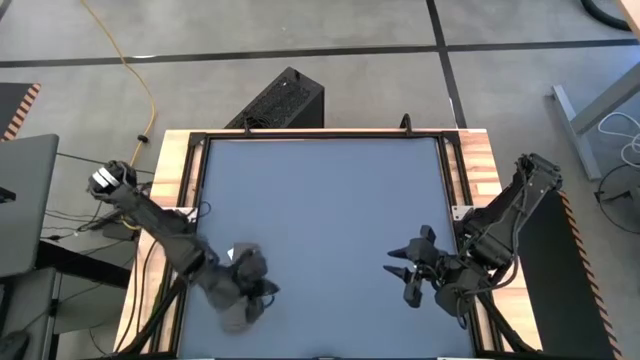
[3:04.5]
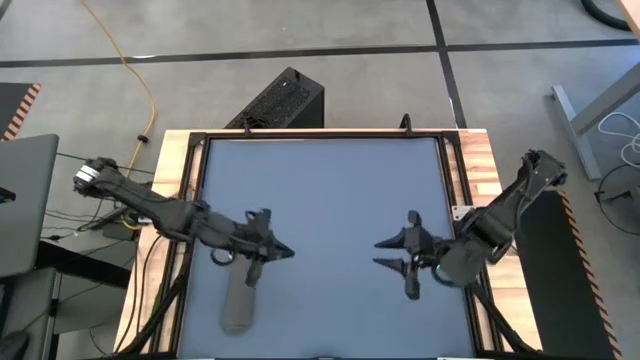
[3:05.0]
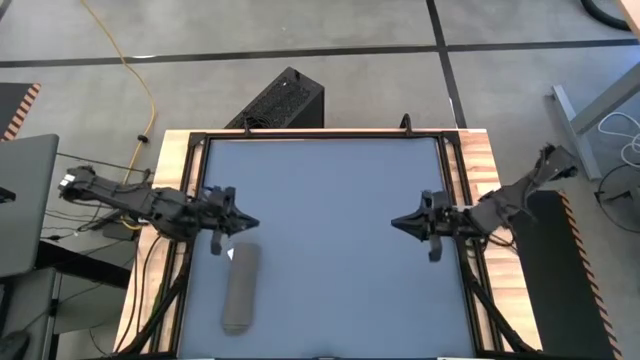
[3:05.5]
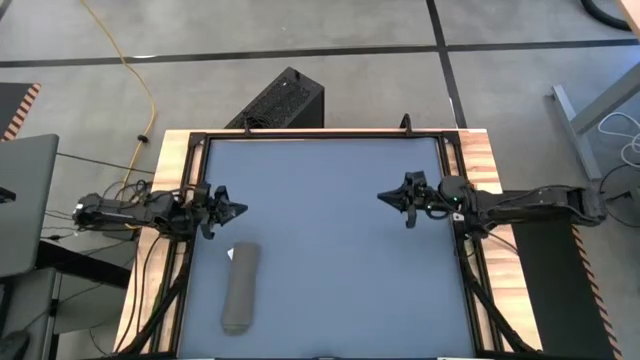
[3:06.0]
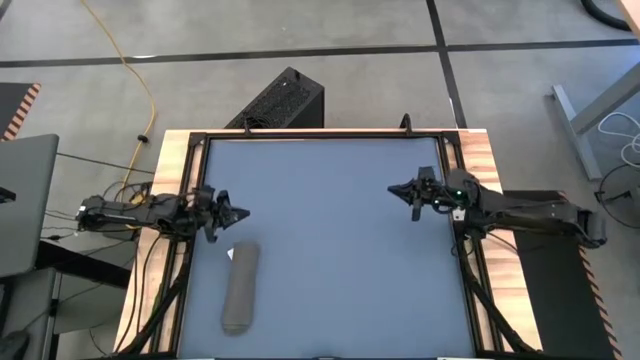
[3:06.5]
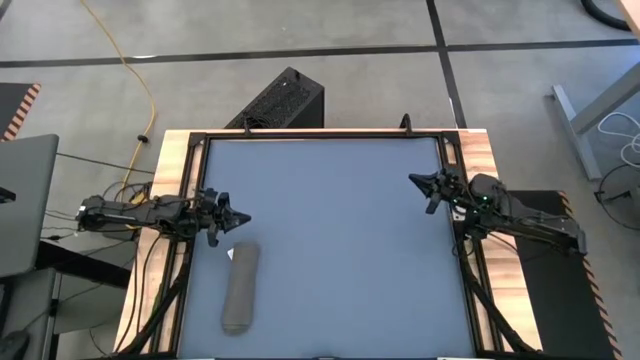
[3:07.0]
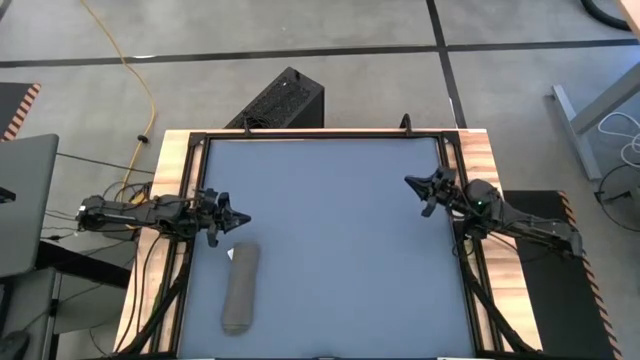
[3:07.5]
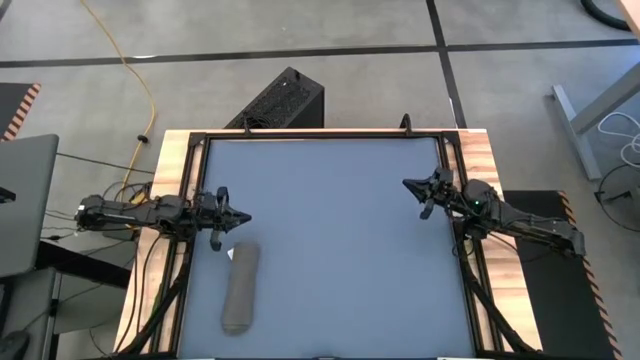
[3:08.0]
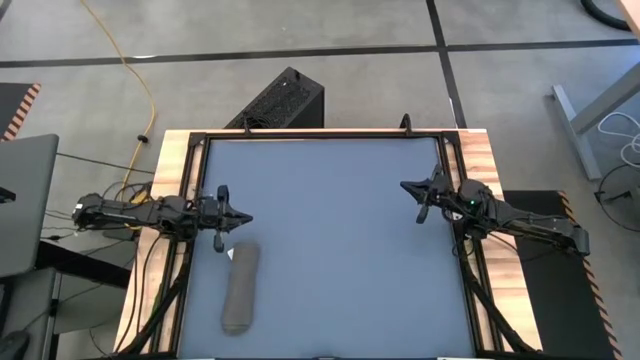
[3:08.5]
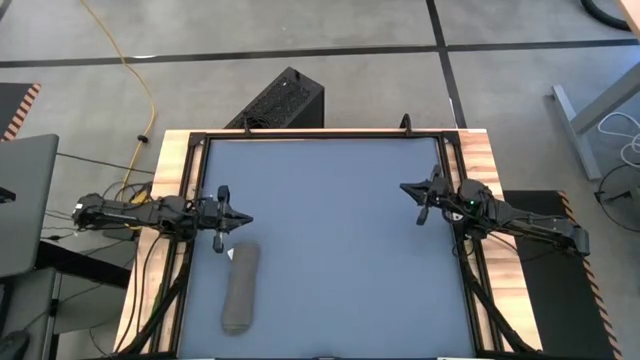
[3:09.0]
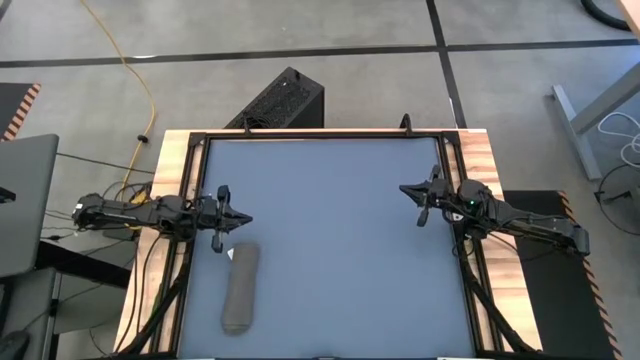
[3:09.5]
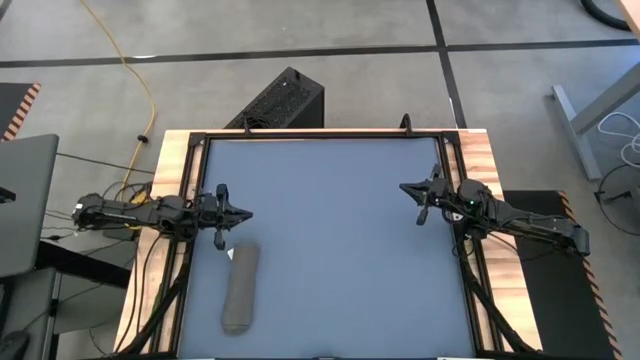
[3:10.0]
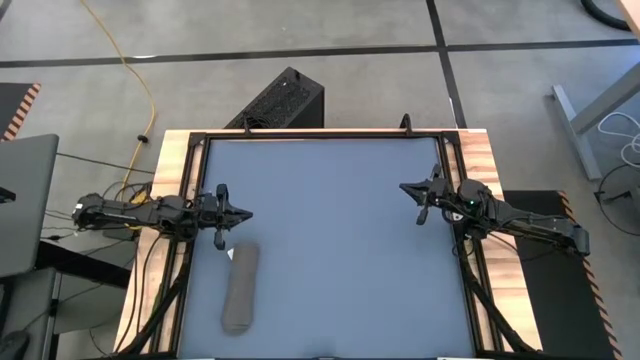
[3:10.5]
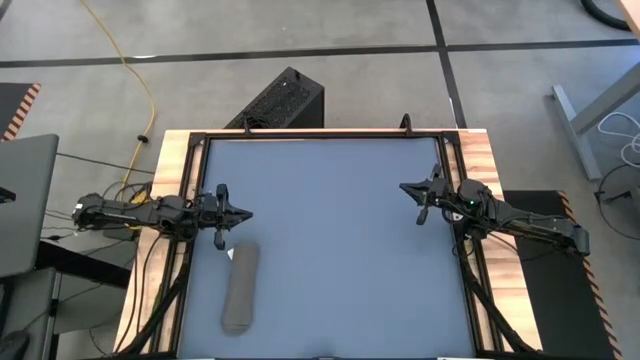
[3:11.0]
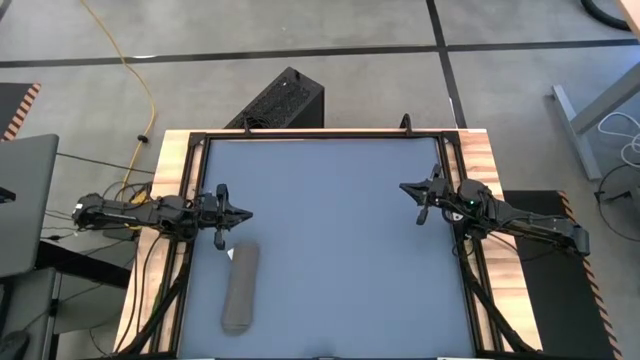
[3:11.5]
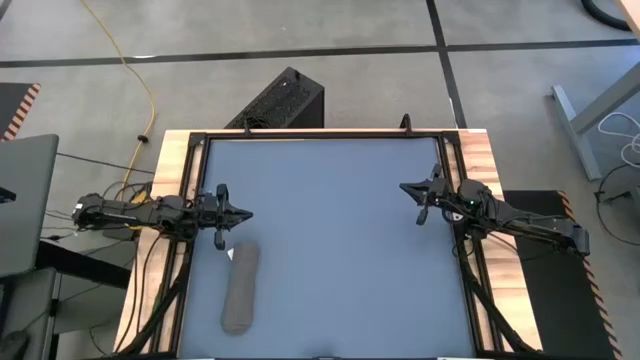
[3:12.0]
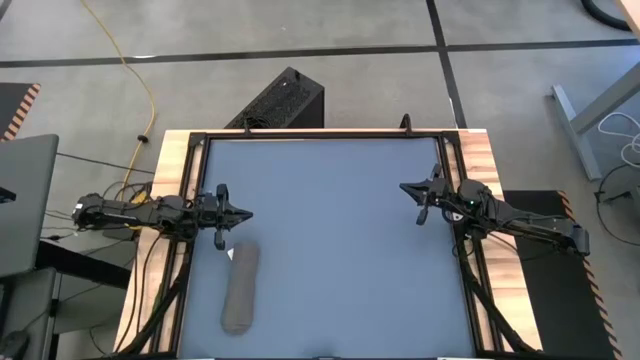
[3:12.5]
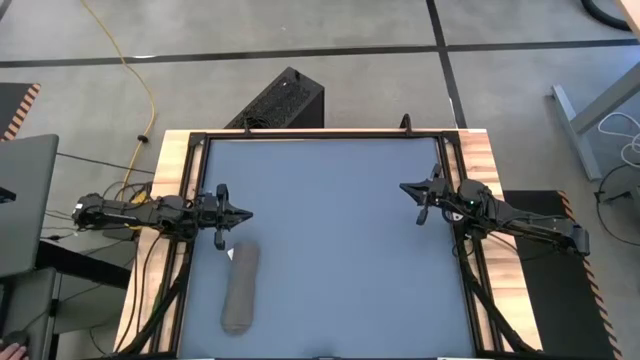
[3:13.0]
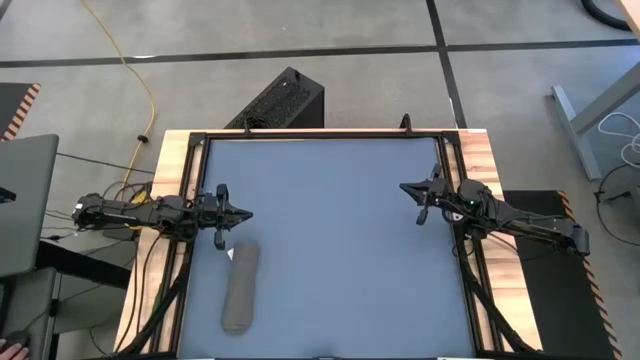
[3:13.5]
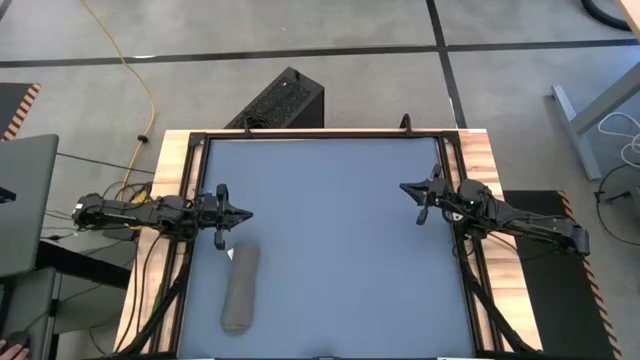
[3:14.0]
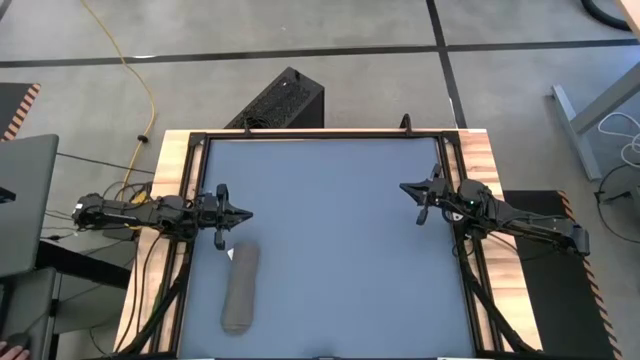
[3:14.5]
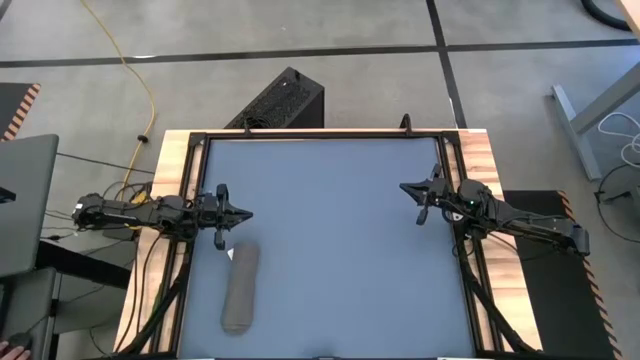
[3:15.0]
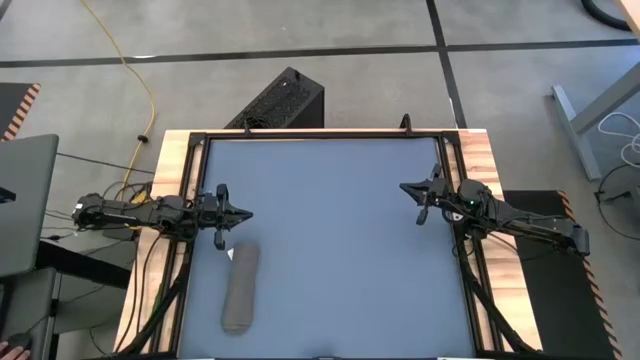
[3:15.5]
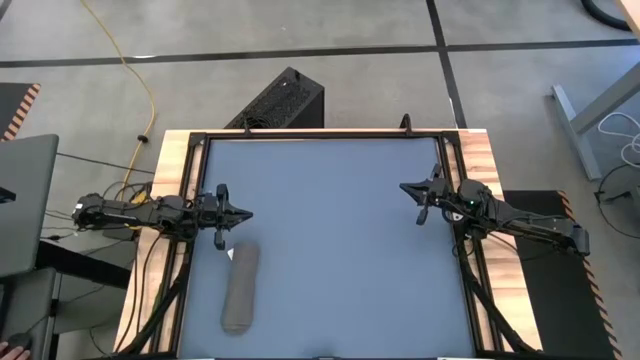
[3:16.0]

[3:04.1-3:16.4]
Task: Roll towel
Return to Home Position

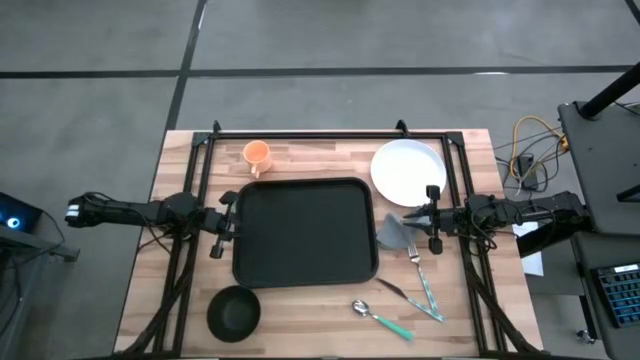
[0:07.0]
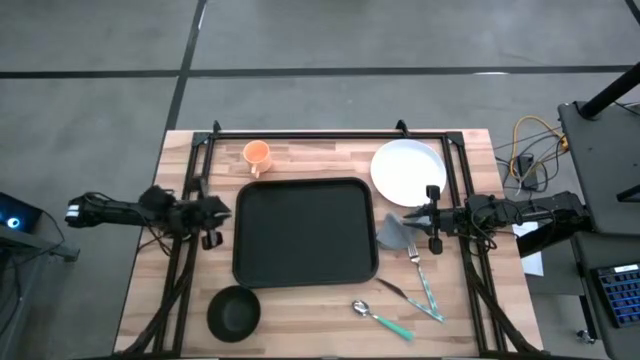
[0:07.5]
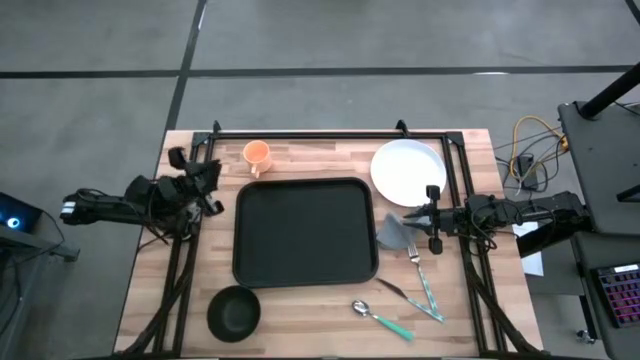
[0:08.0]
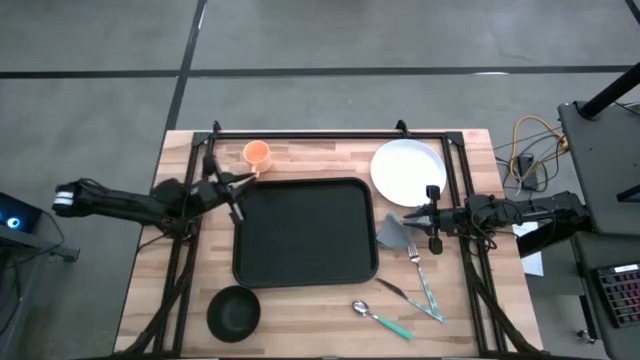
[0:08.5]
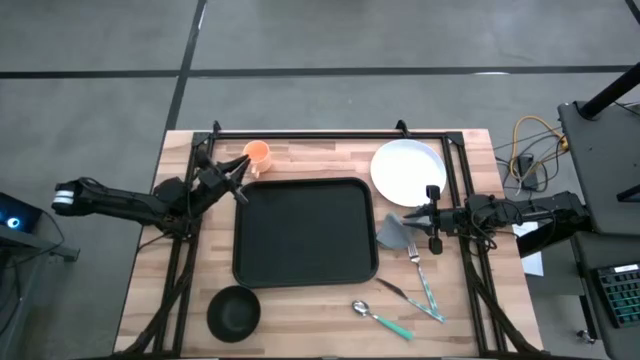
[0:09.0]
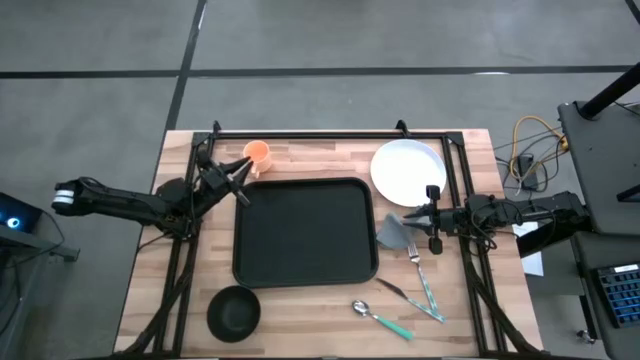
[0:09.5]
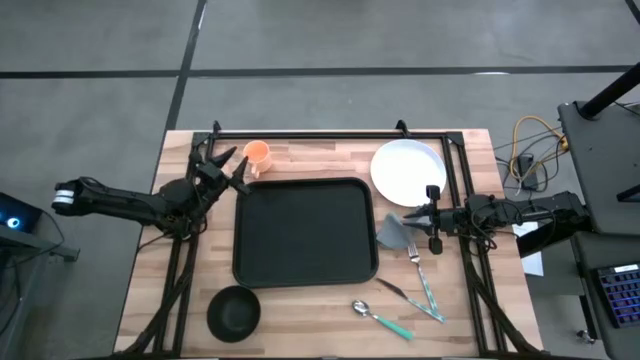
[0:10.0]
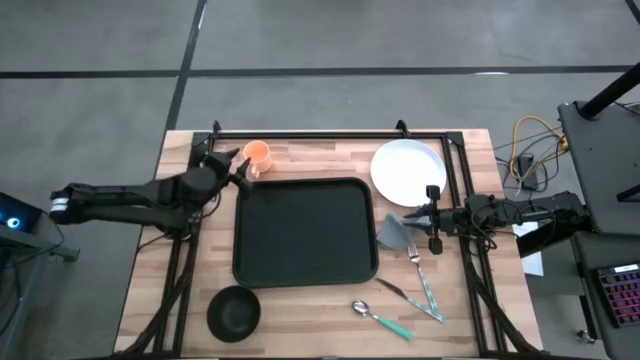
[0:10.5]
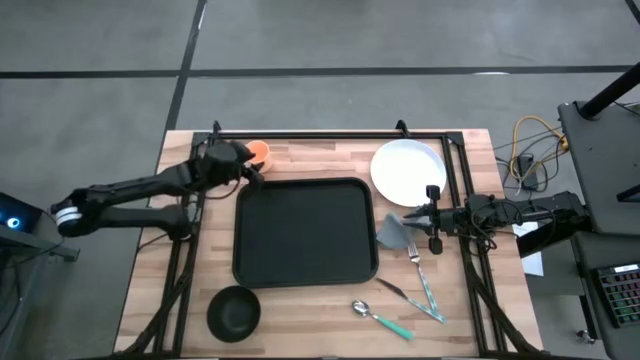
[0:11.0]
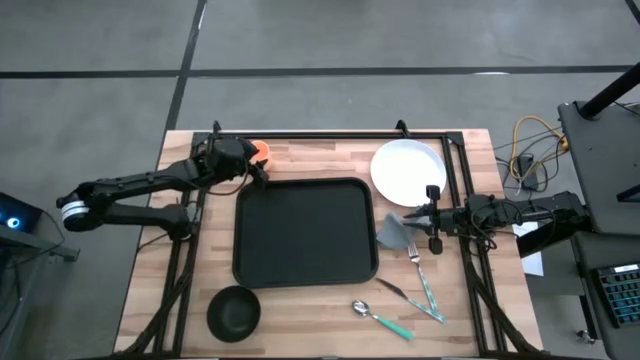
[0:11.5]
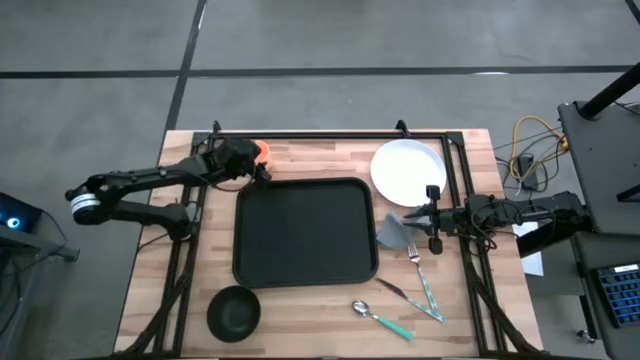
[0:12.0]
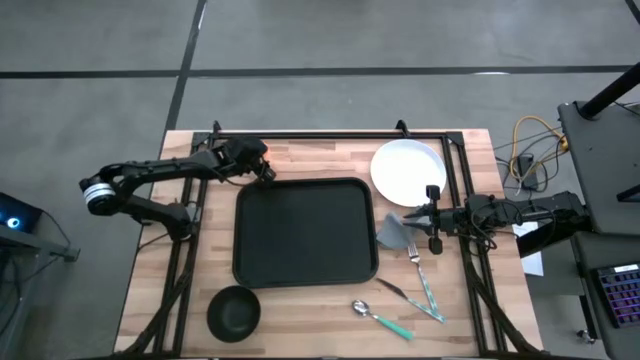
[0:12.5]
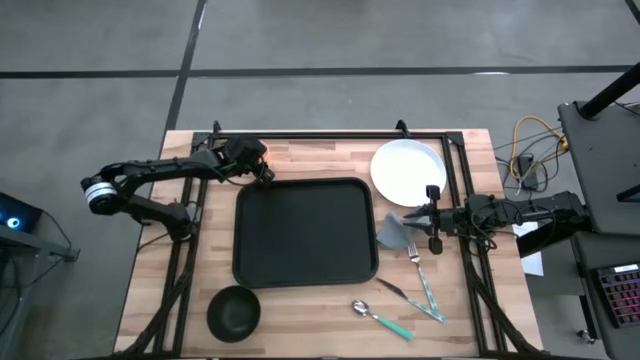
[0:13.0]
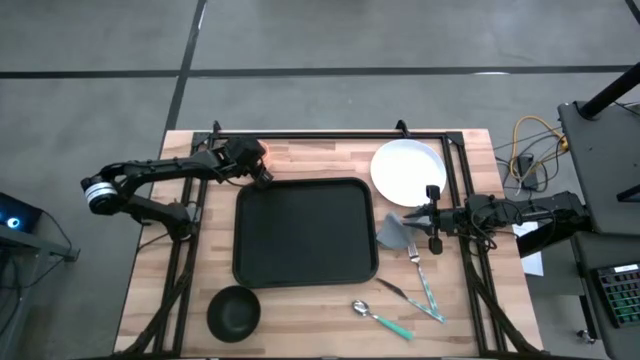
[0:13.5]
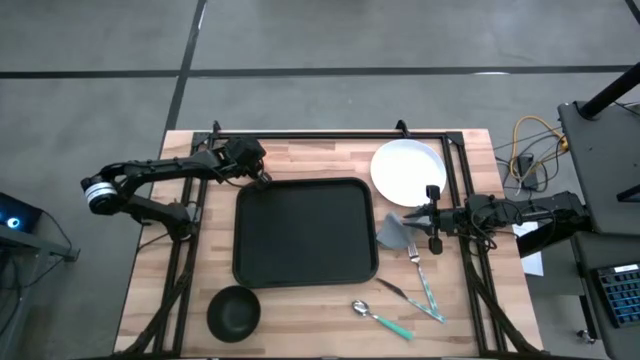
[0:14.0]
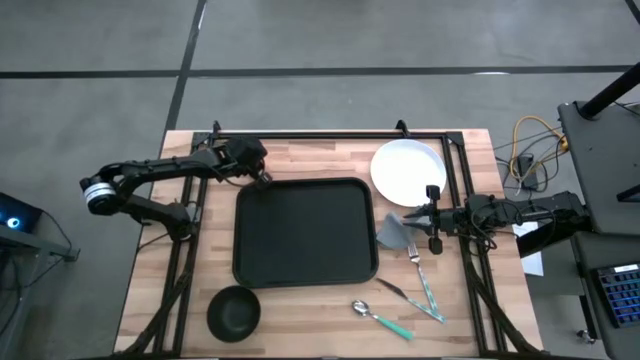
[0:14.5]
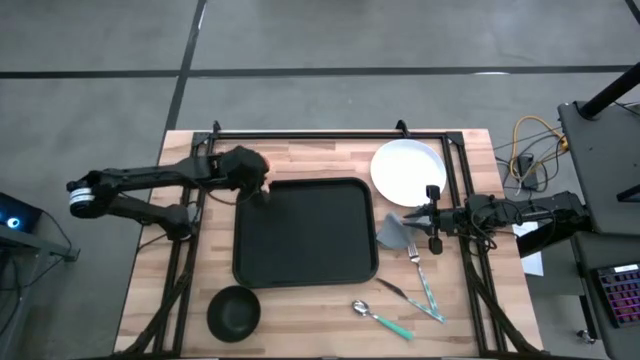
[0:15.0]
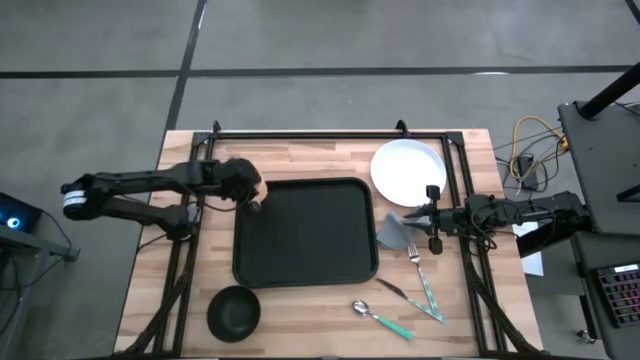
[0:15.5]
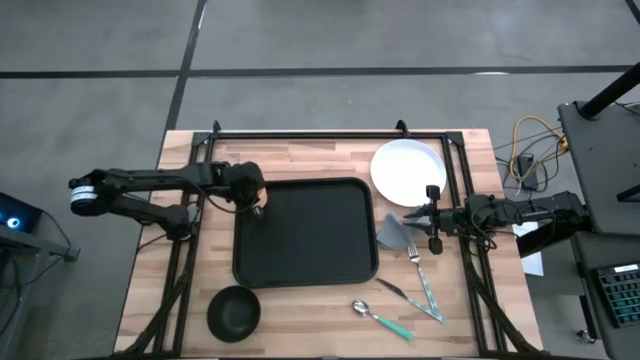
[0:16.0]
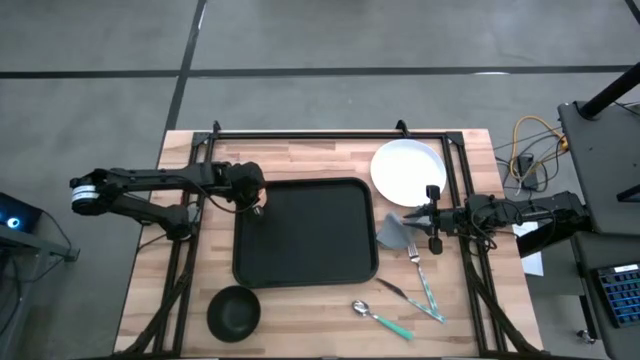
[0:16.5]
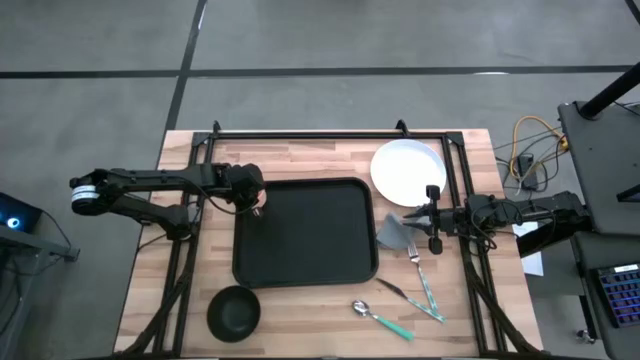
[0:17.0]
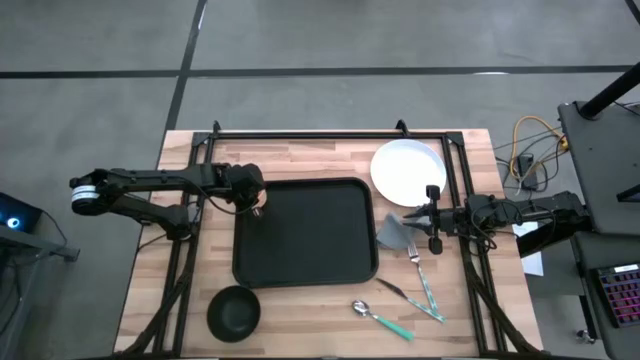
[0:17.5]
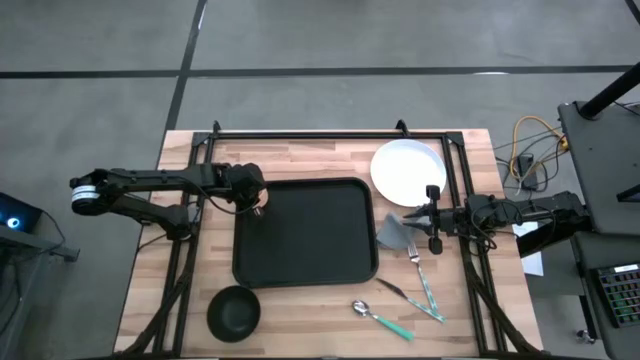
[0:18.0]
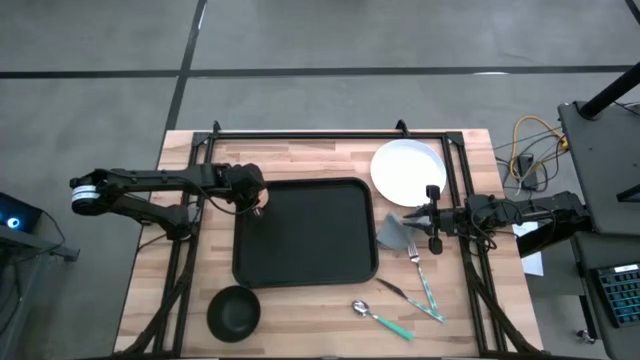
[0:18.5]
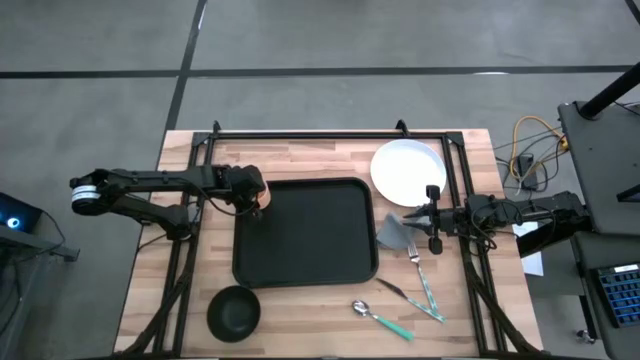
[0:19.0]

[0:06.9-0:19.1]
Task: Set up tray
Put the orange cup on the black tray
